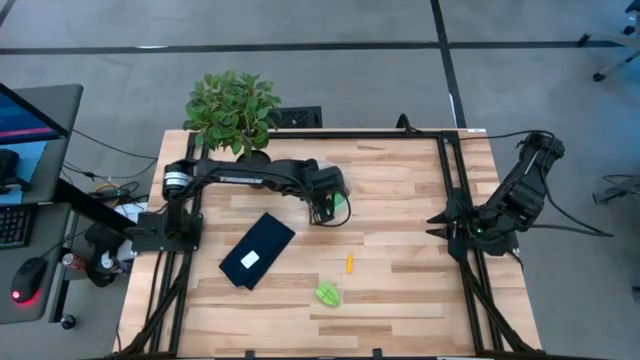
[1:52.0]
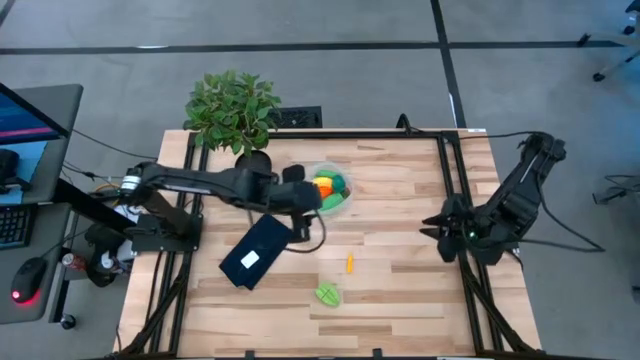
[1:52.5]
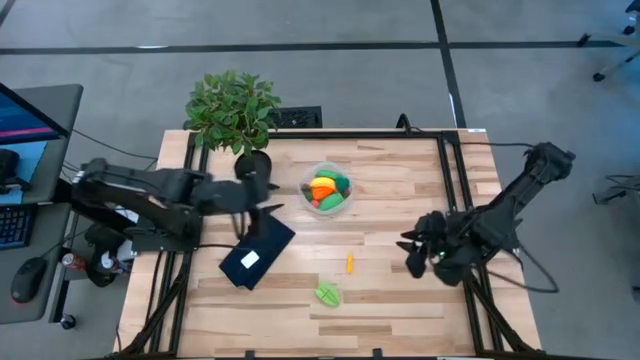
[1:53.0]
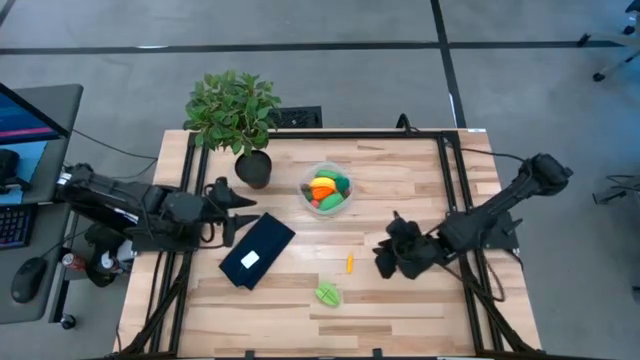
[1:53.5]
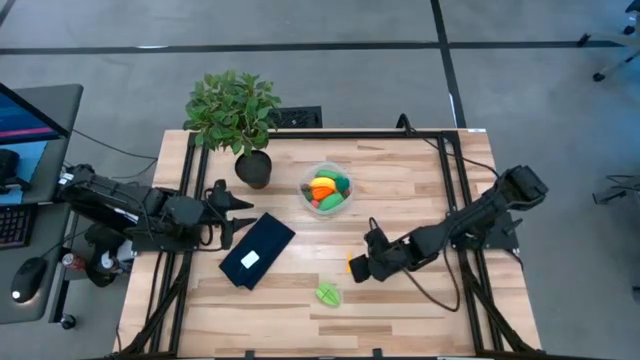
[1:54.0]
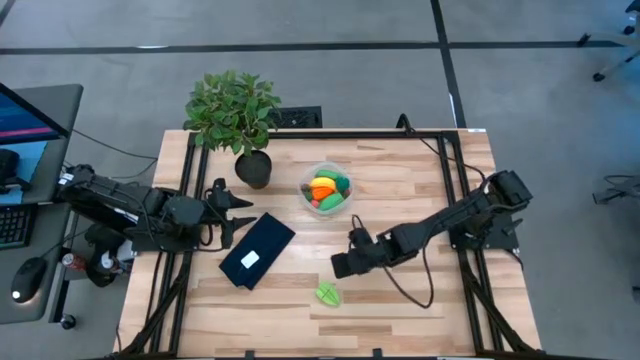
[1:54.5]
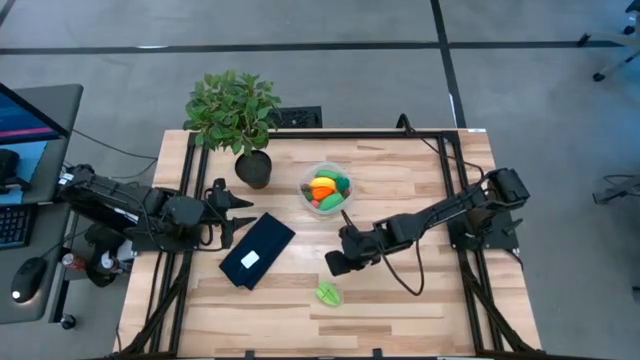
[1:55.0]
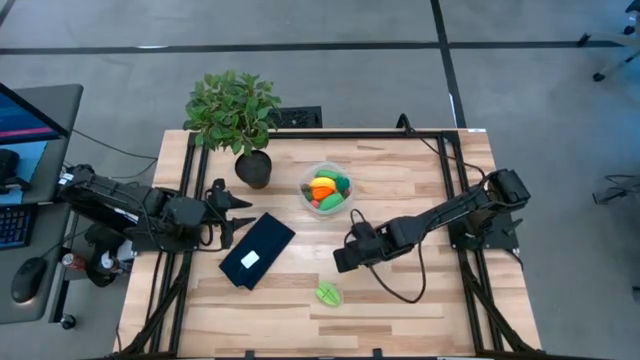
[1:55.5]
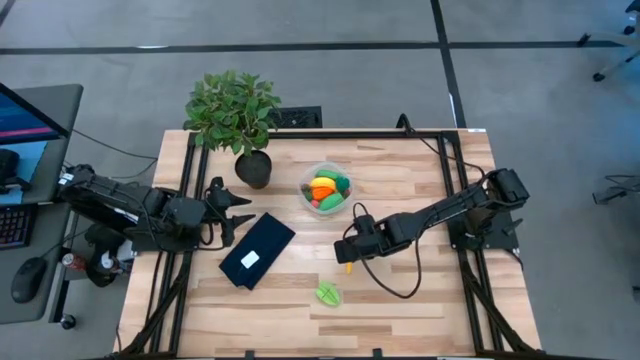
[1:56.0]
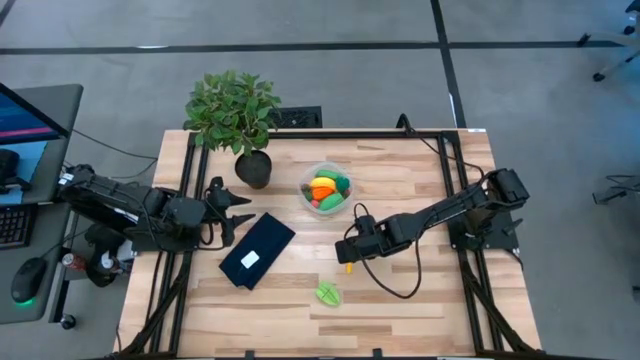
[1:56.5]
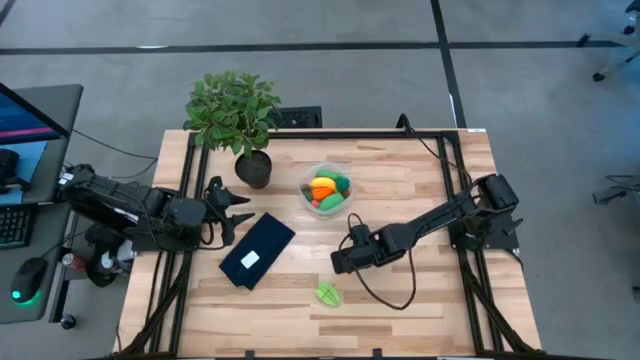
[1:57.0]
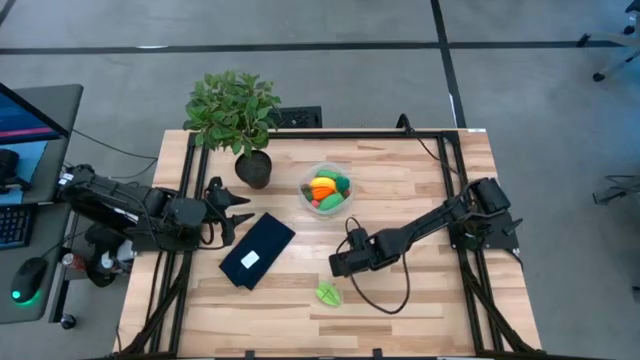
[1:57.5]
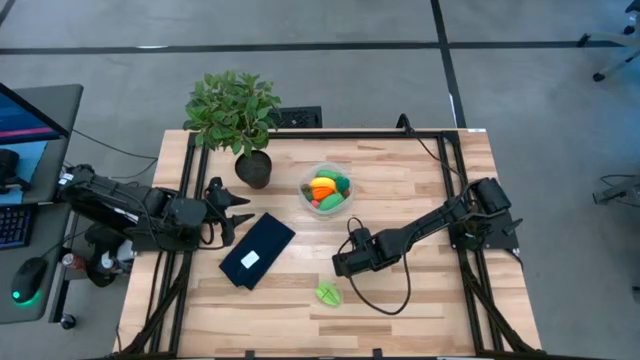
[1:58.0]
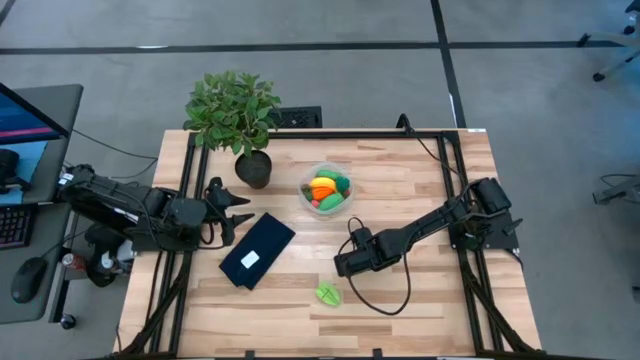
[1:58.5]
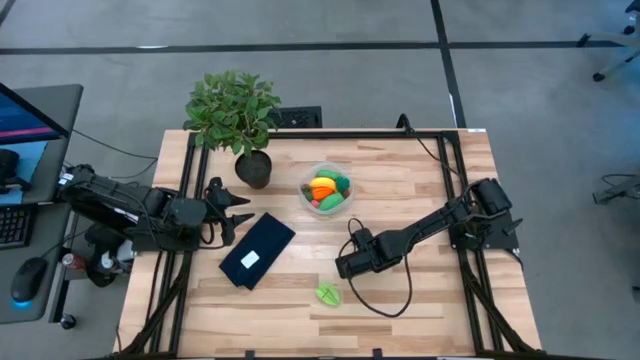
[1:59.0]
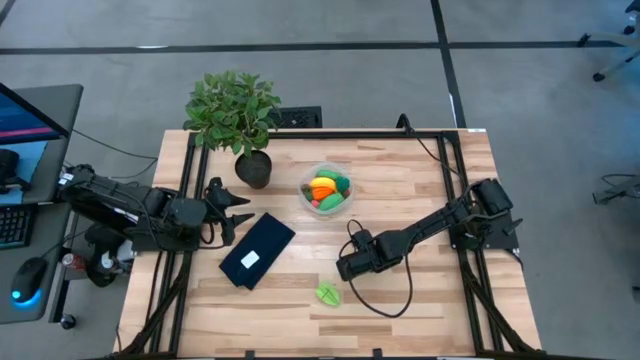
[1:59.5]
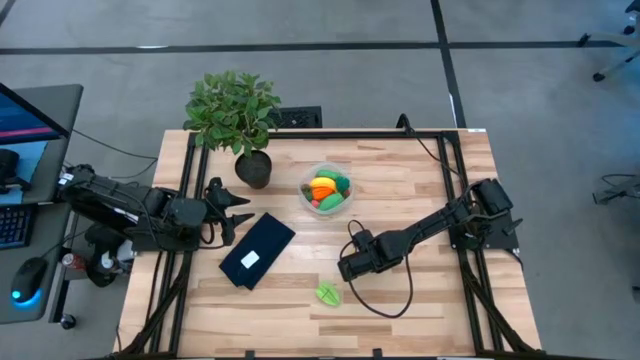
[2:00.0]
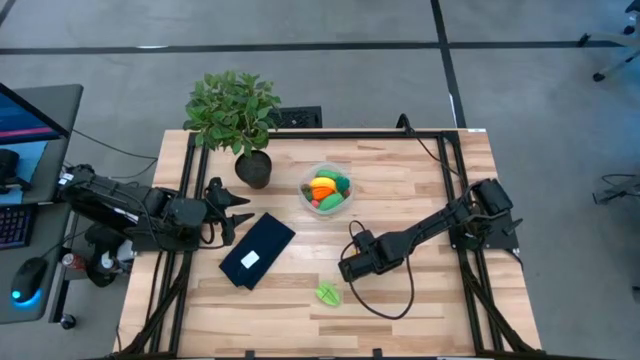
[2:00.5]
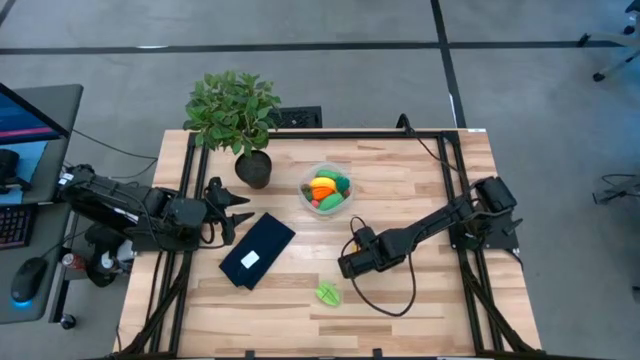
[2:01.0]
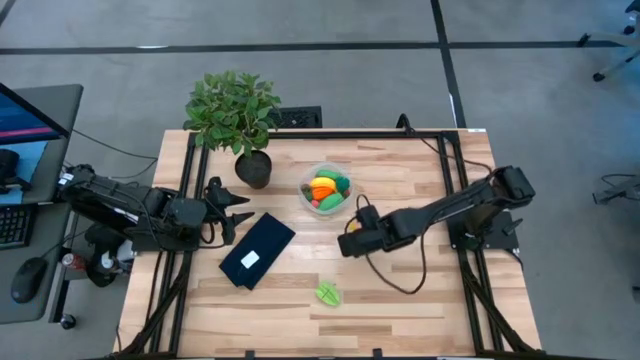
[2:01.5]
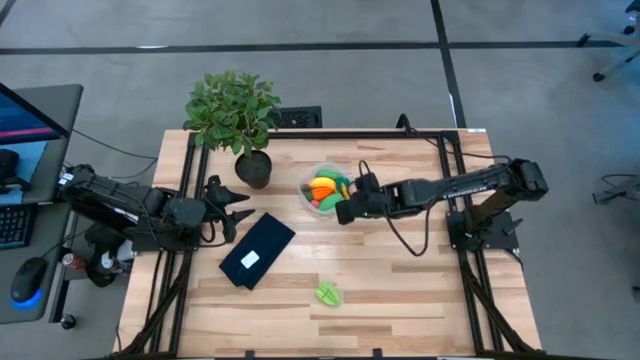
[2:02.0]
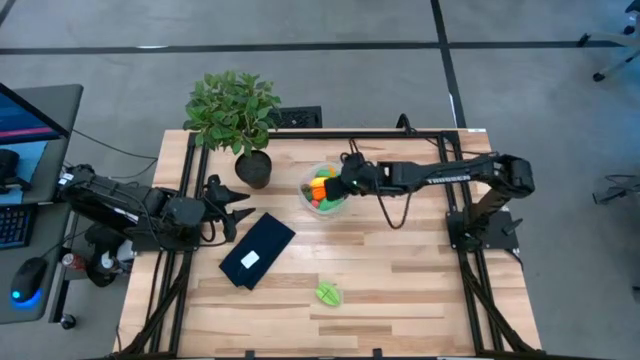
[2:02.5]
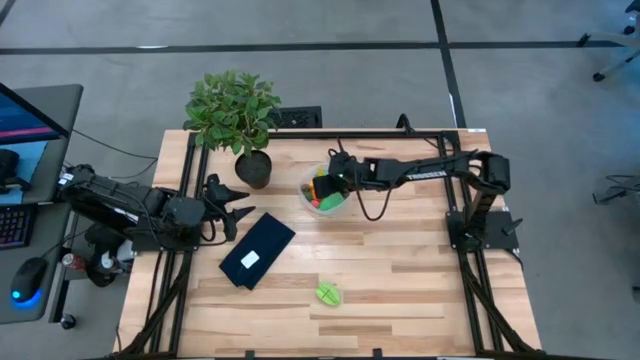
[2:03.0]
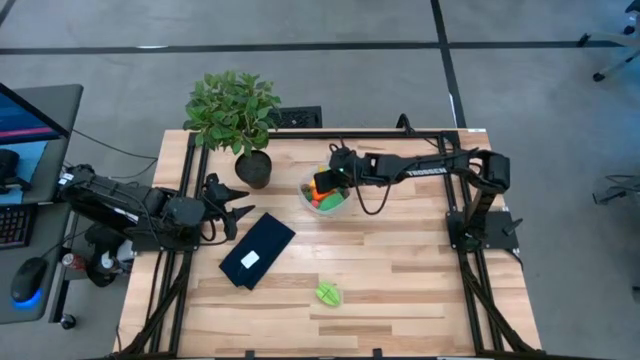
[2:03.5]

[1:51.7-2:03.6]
Task: Pick and placing Produce into tupperware
Put the yellow corn into the transparent bin

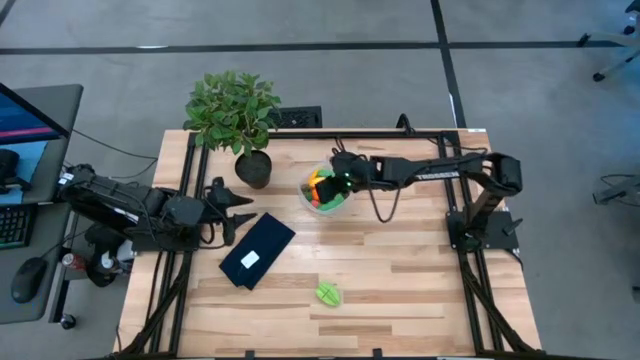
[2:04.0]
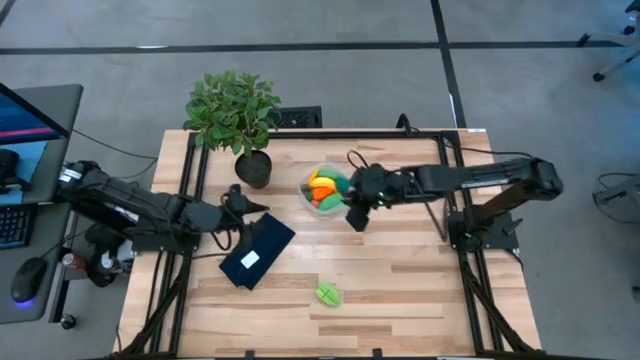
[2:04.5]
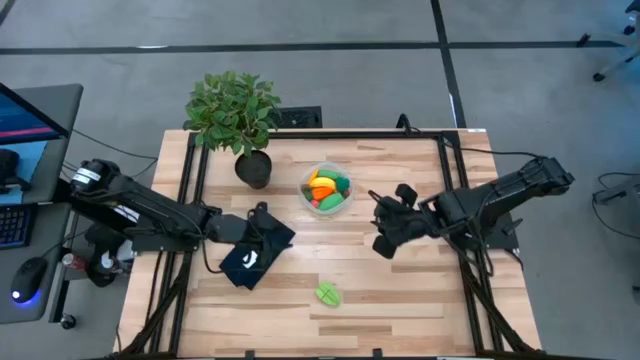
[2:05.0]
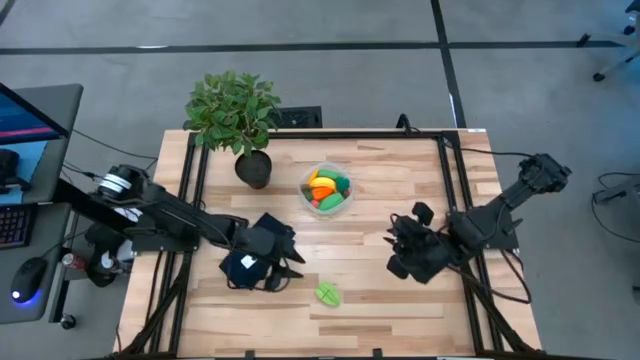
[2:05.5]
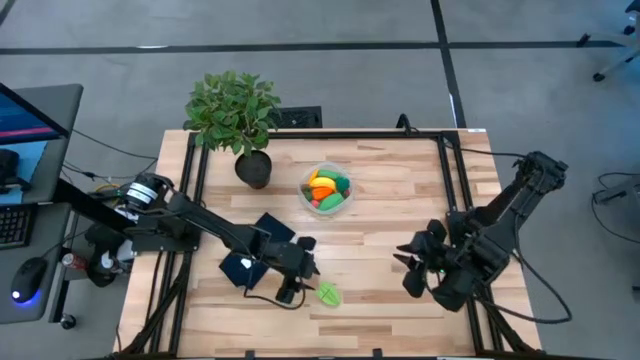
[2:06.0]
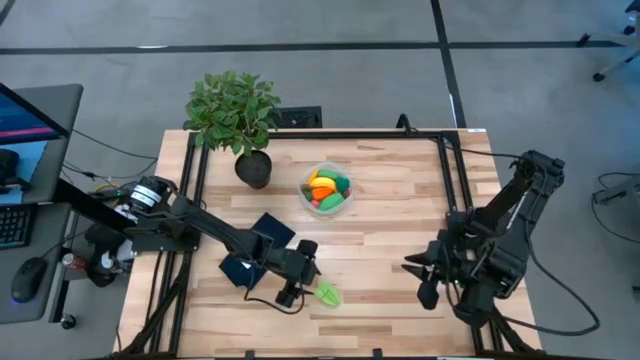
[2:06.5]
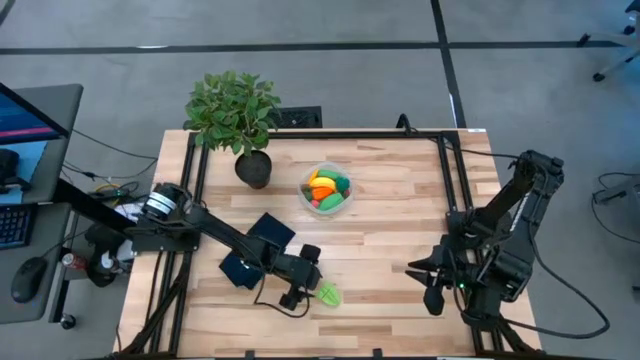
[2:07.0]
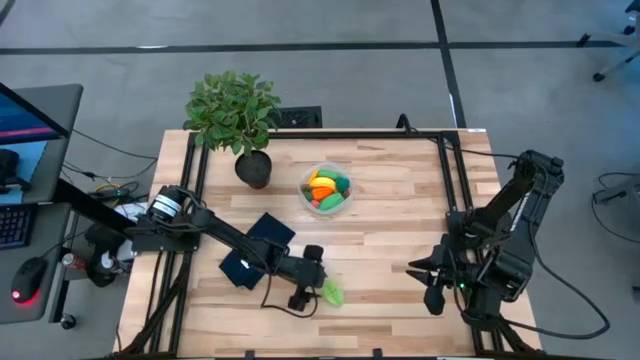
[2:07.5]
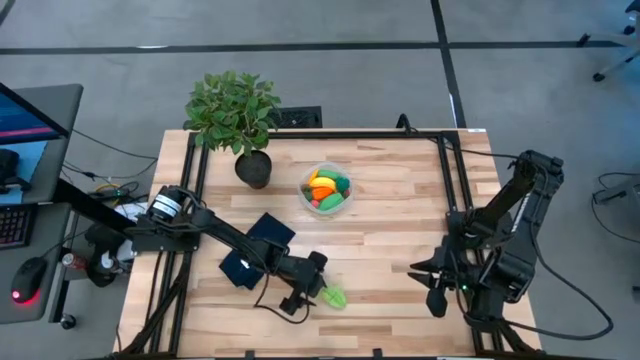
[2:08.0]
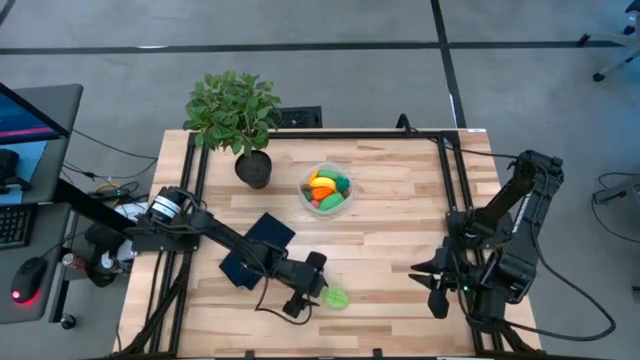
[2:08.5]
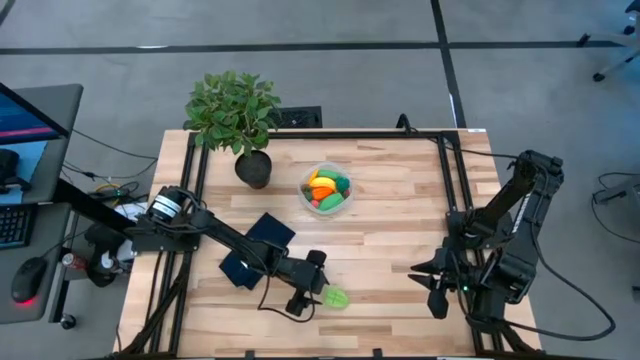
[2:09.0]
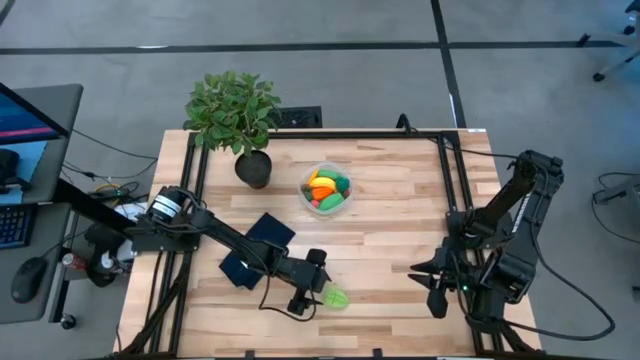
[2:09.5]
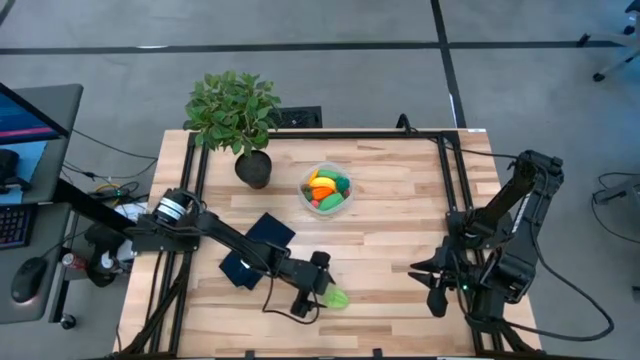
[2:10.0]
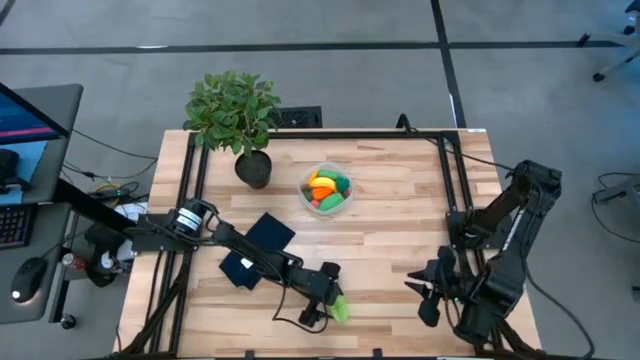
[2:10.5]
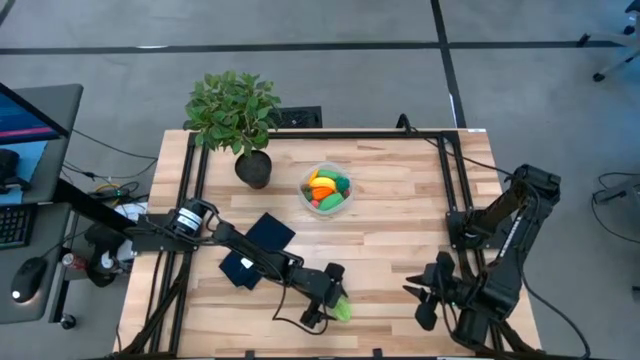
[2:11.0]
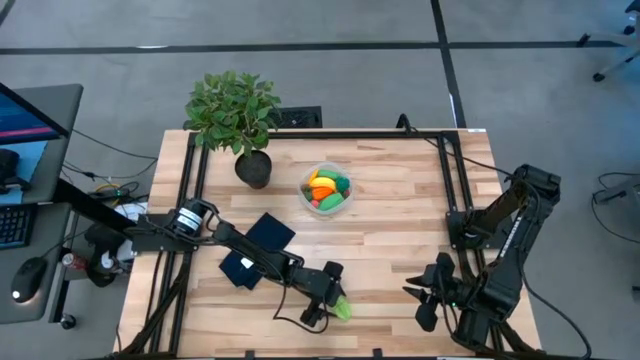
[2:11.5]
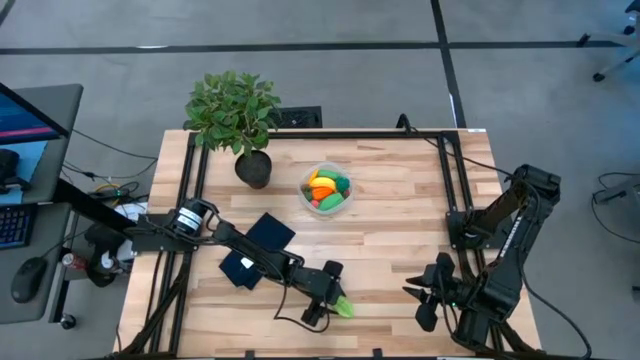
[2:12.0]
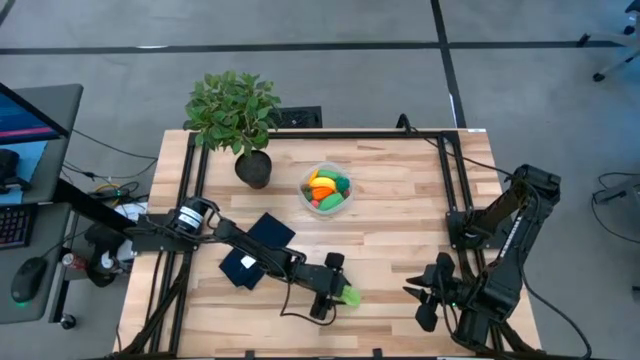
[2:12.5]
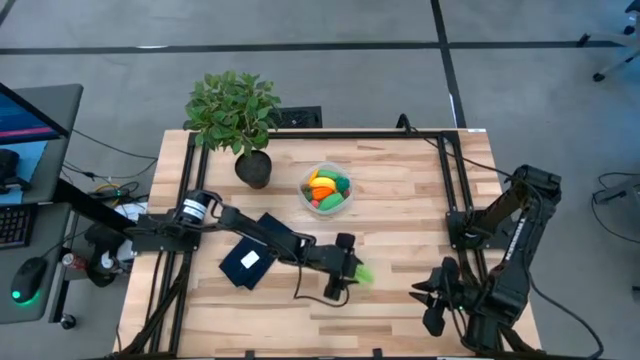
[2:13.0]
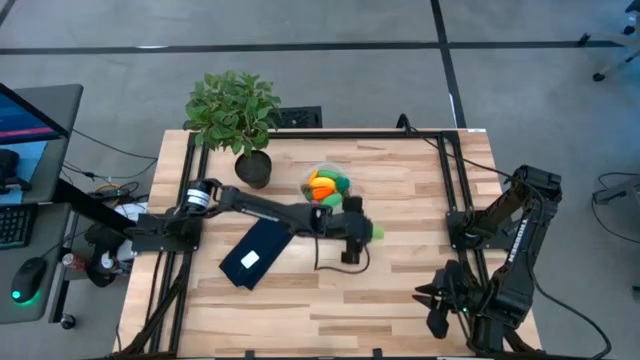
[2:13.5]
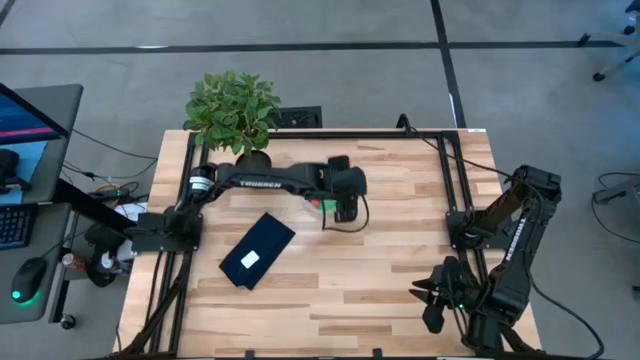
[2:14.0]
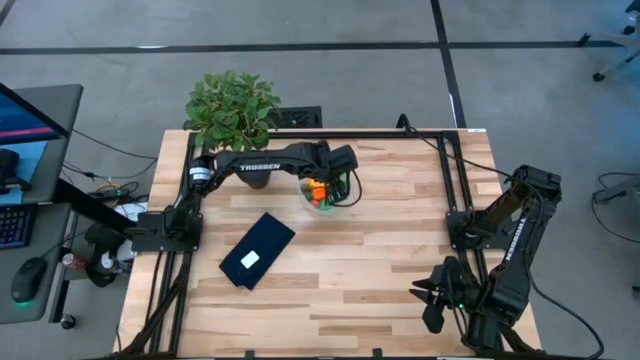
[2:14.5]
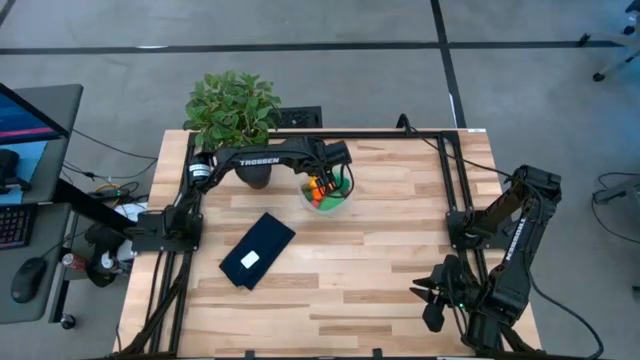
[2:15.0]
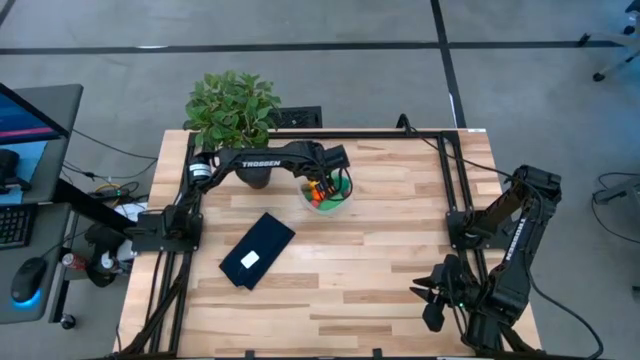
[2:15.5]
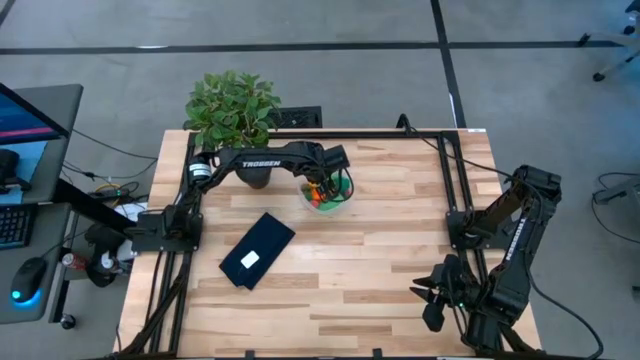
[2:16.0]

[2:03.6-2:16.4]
Put the green starfruit into the transparent bin
